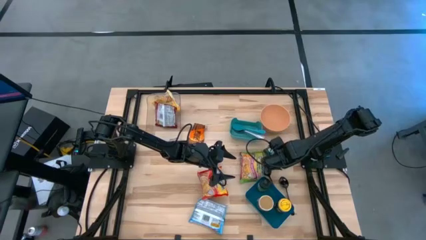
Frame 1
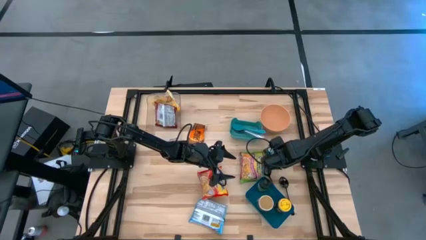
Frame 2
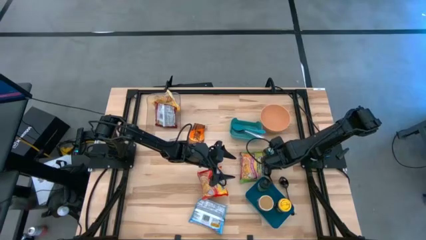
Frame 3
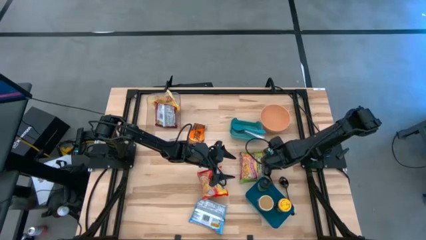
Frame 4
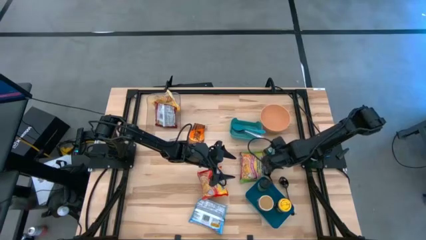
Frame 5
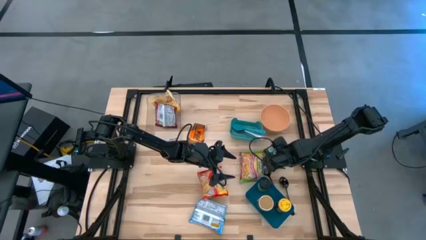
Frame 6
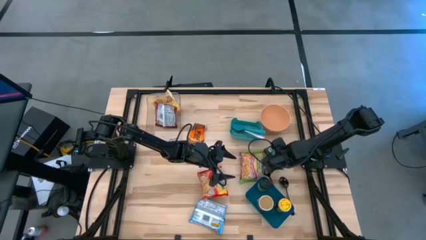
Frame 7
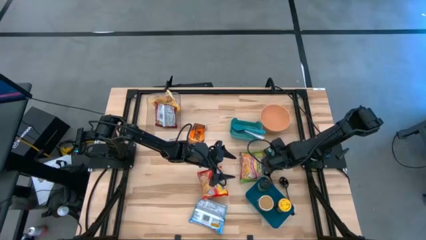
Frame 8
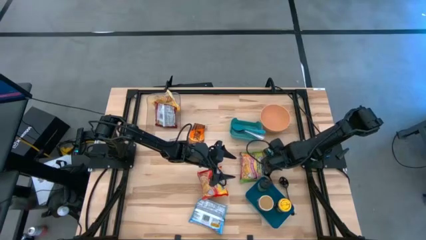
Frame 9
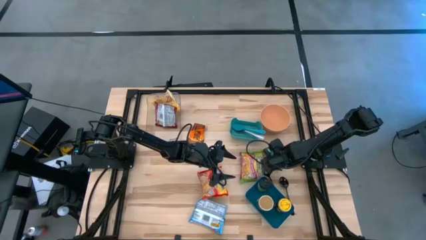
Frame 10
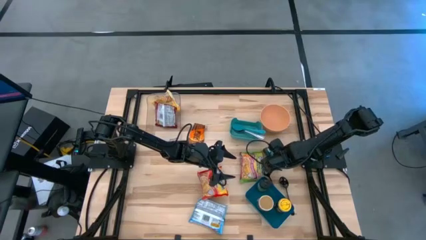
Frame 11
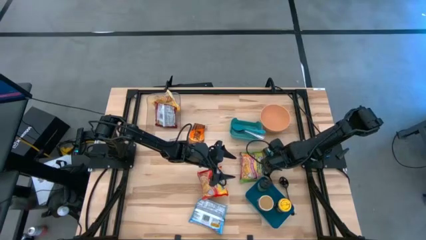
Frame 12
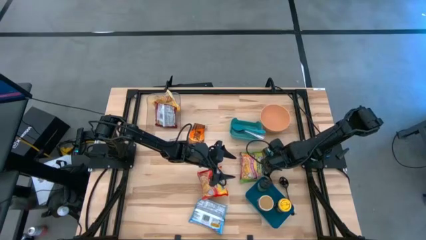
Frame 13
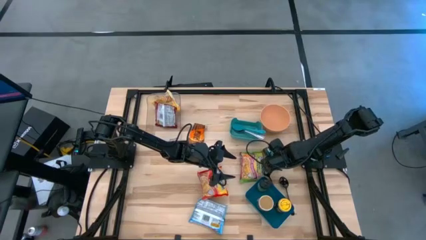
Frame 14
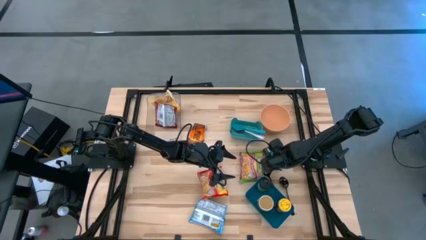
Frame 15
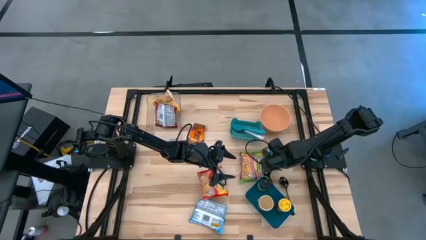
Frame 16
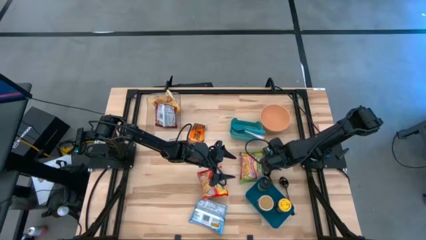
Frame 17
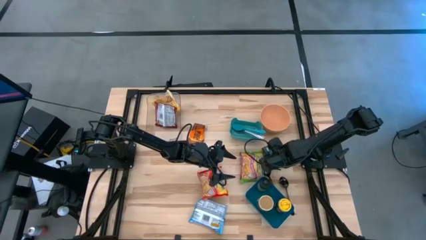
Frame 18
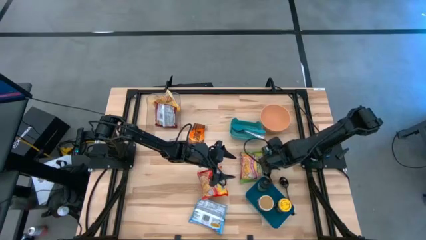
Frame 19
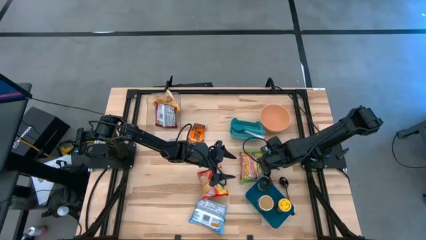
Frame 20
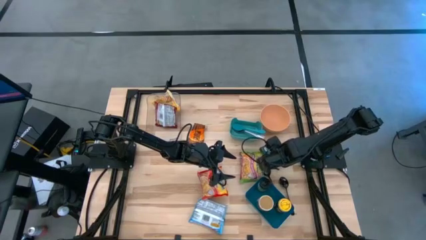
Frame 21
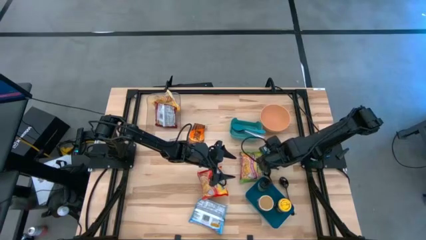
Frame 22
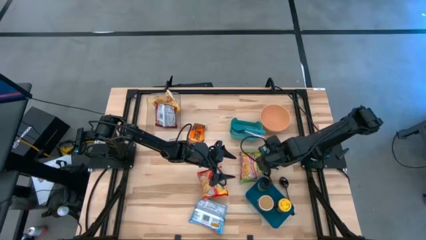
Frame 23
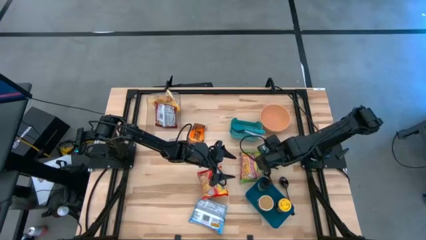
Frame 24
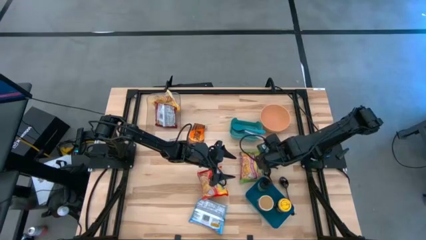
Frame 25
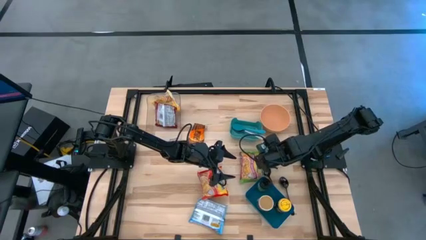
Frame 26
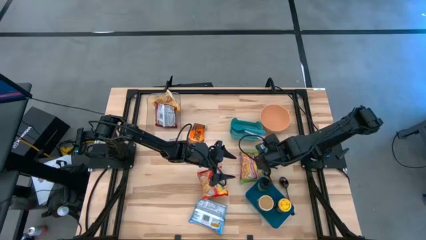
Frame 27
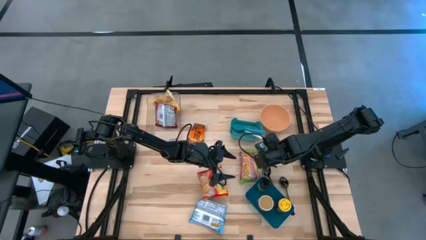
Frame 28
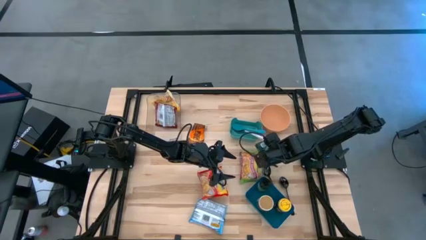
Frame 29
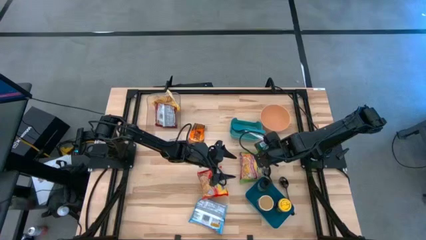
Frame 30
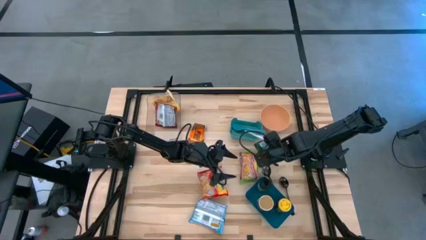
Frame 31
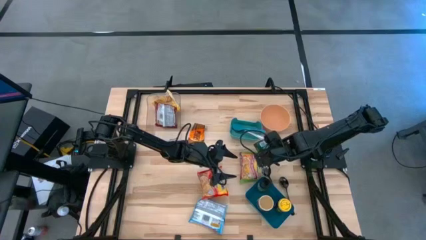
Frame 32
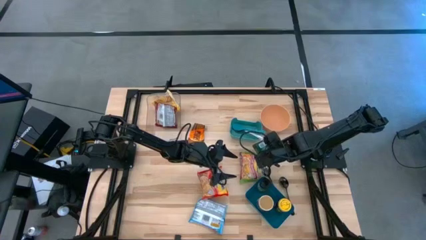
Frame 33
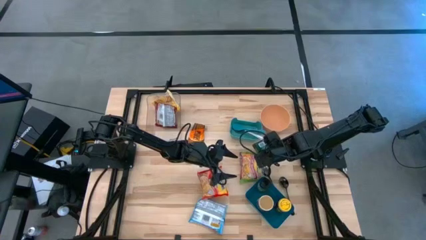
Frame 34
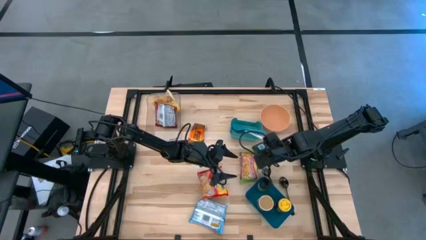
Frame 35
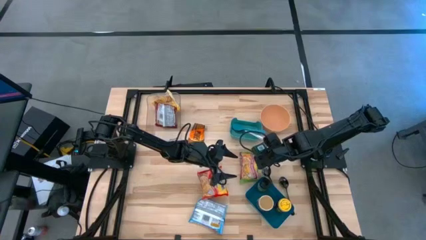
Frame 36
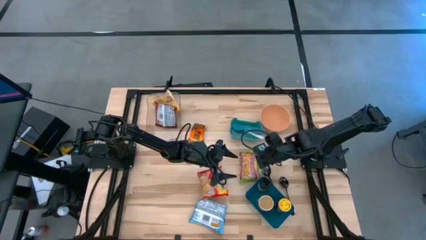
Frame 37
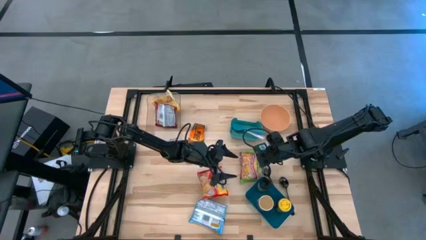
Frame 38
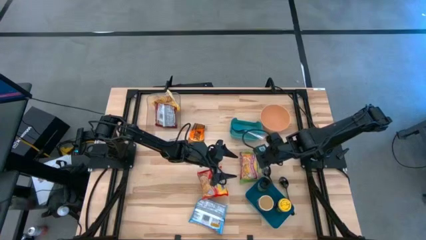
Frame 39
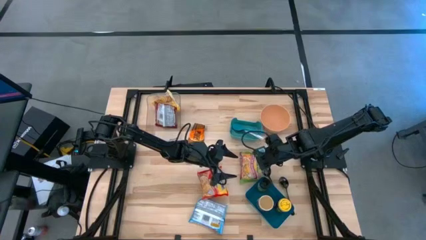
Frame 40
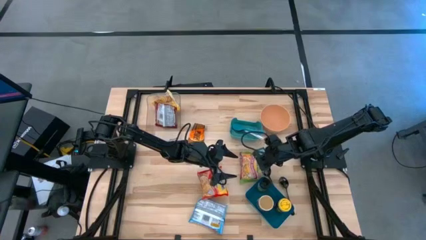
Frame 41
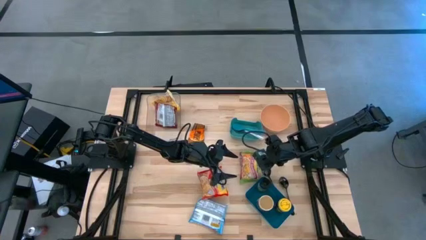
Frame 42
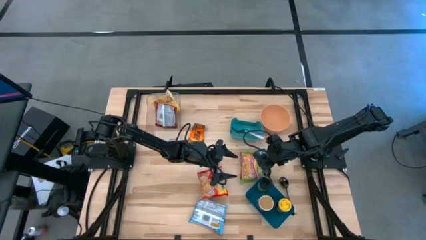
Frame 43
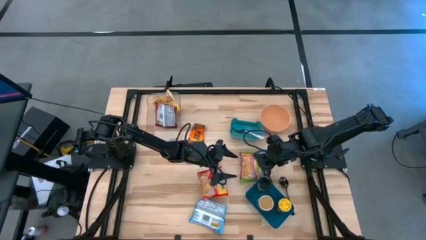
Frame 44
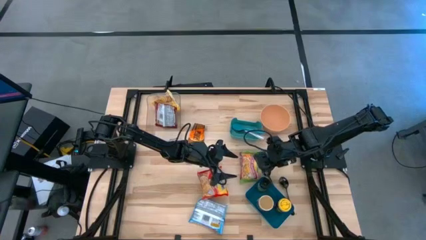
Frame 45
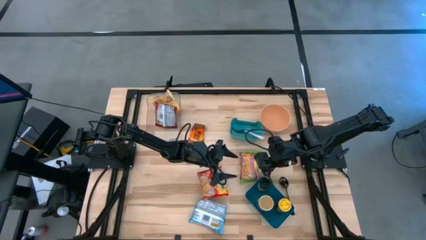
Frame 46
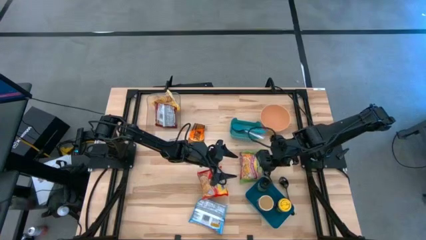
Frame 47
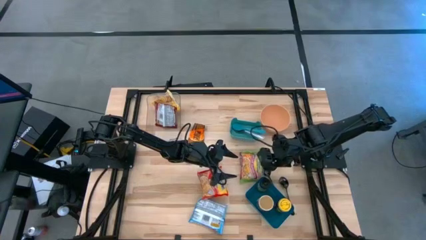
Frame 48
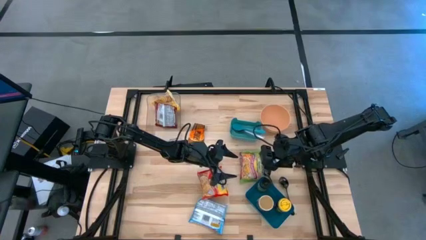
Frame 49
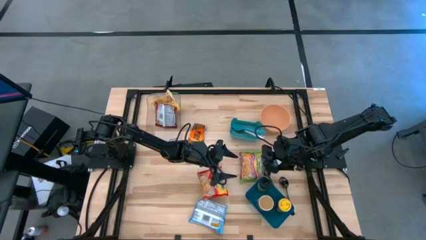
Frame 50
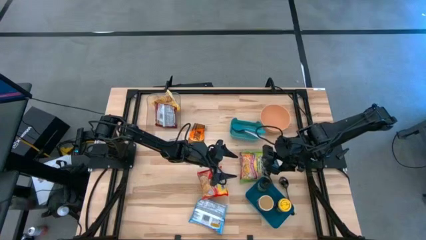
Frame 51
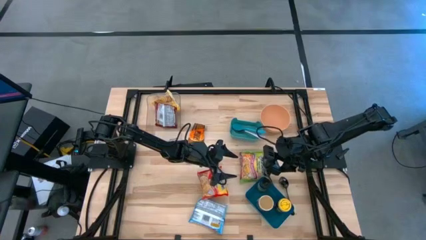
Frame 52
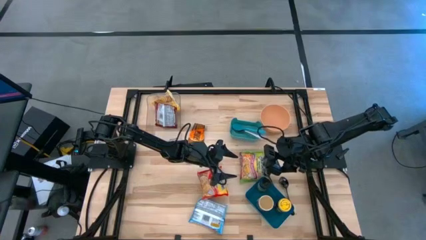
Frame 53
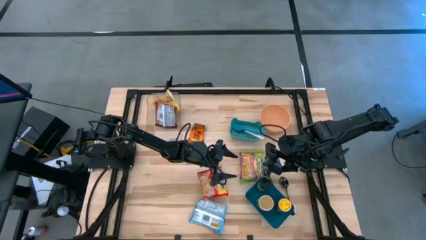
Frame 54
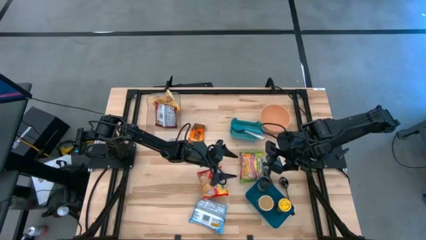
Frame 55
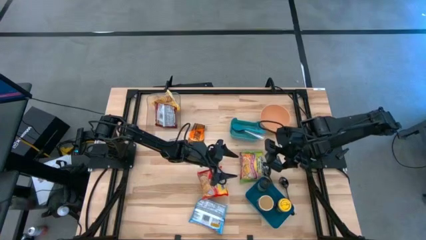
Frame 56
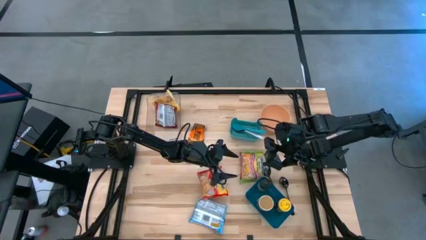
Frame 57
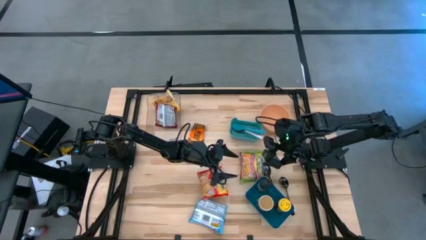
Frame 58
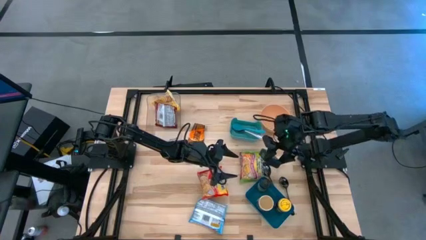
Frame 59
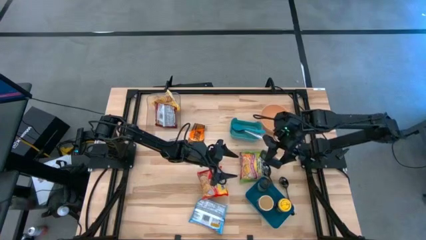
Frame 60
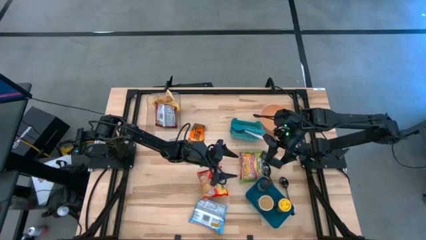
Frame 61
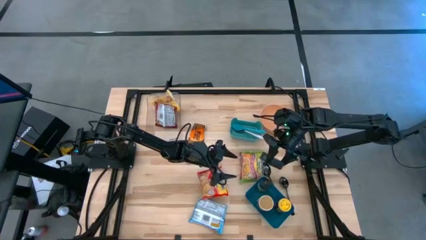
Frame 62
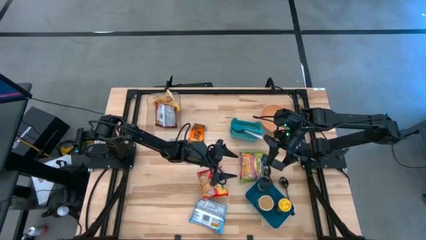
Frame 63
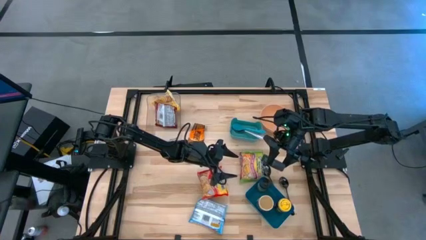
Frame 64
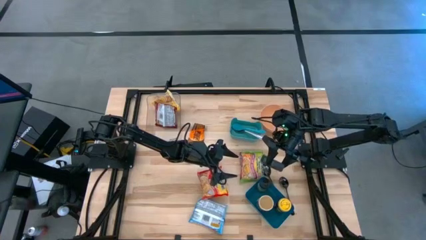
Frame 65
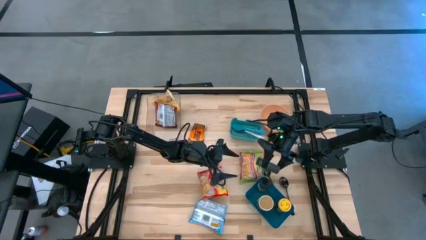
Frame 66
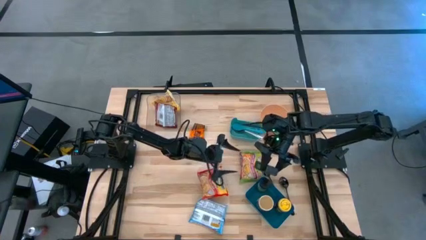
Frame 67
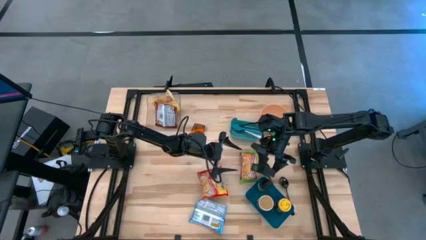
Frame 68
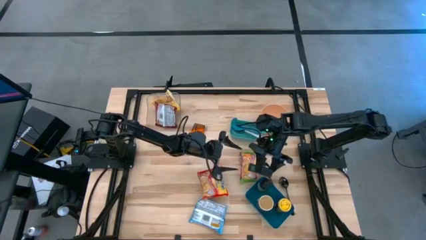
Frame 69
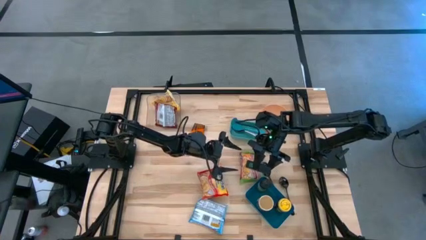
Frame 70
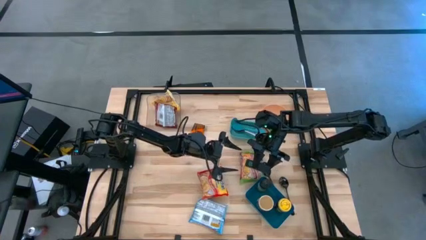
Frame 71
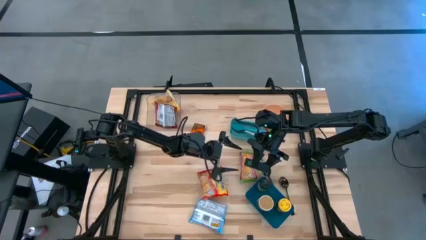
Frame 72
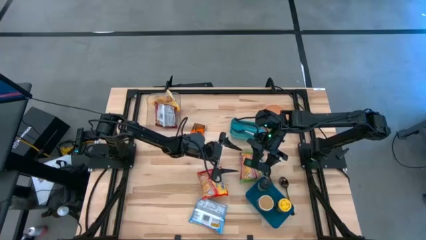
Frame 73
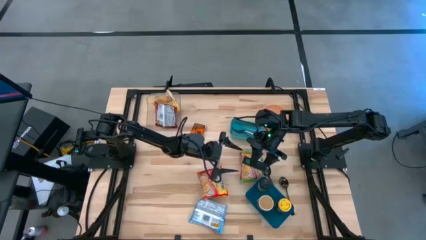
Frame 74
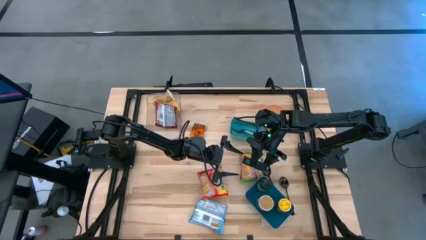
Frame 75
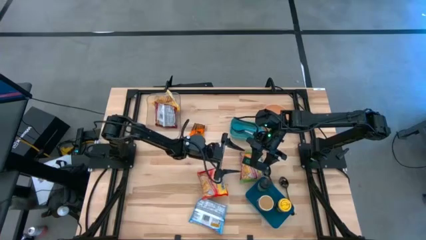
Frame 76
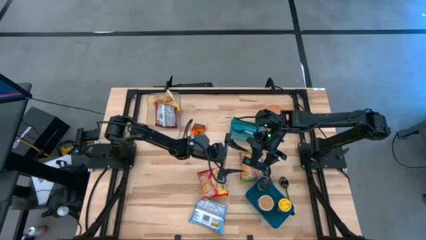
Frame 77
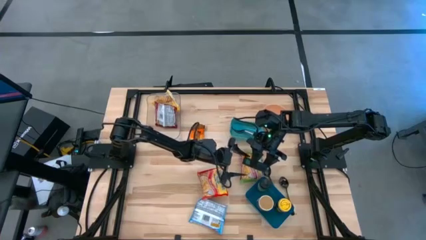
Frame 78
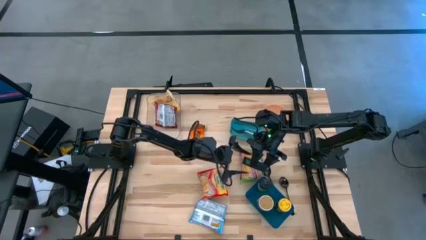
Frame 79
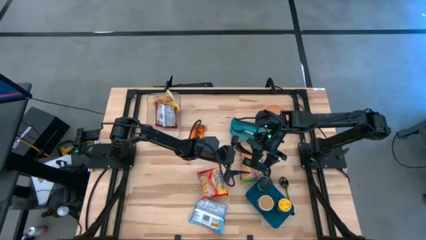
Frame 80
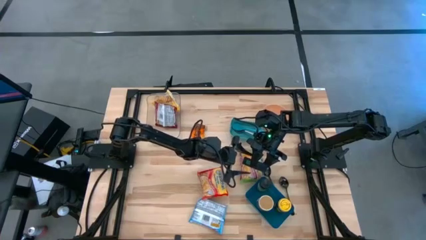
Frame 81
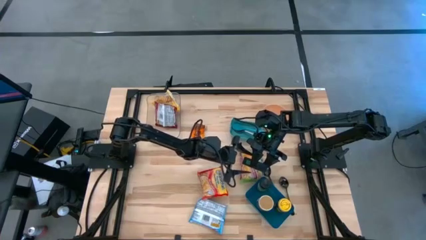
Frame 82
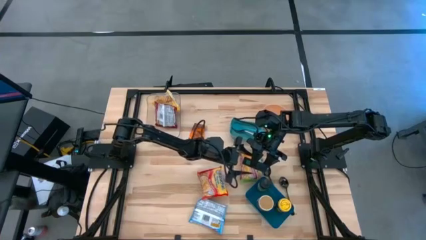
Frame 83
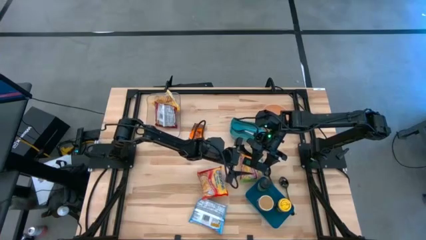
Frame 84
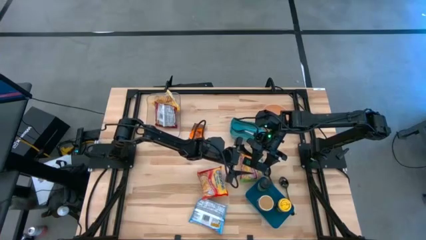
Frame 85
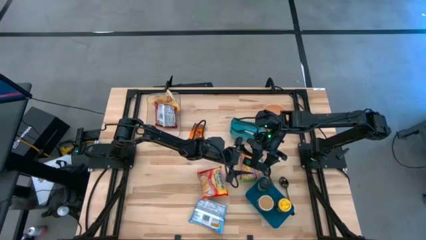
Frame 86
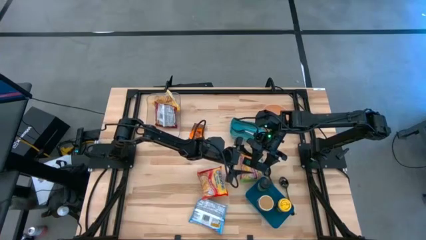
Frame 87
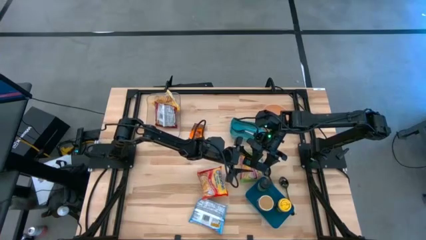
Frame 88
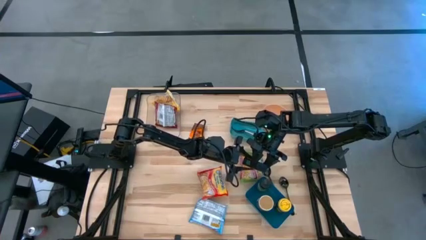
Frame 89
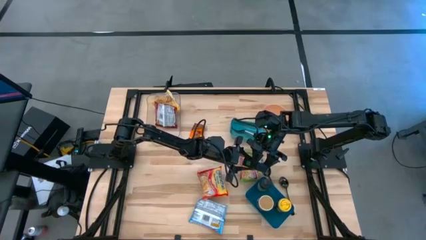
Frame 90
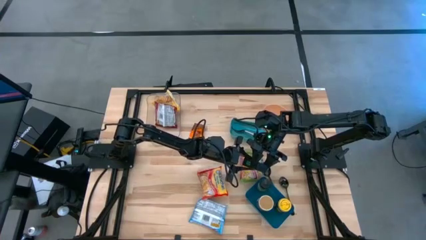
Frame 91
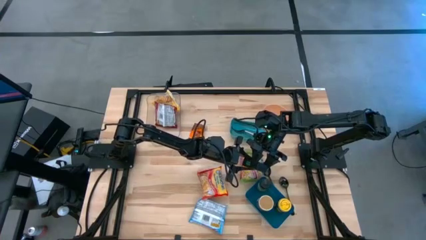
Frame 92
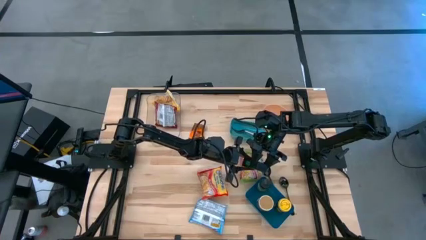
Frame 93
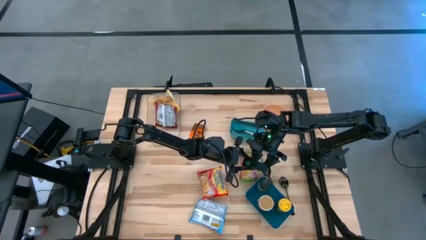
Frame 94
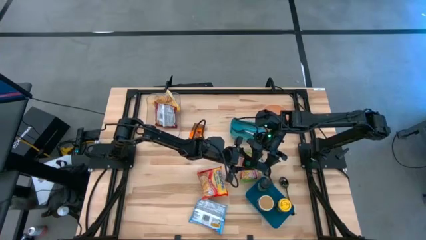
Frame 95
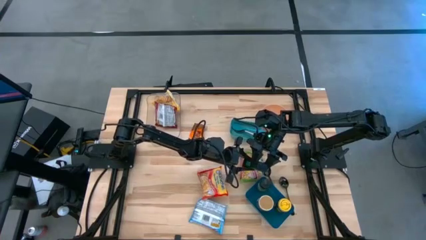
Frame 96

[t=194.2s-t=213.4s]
Task: Pick & Place Food Item
Put the green seasoning can into the blue bin
